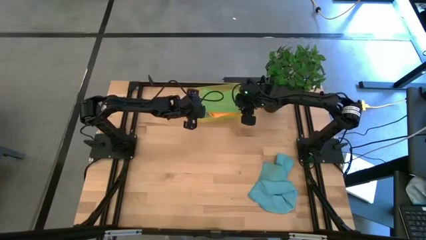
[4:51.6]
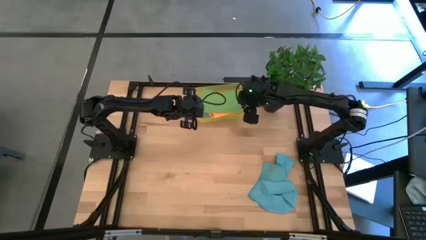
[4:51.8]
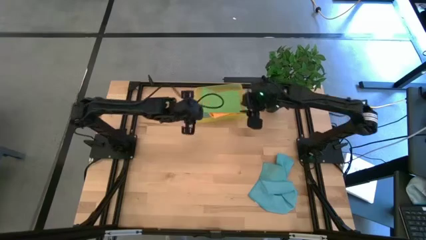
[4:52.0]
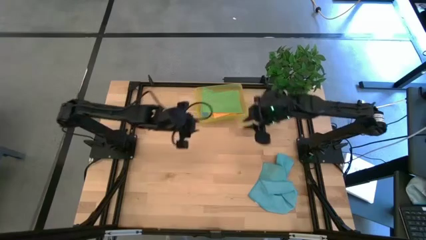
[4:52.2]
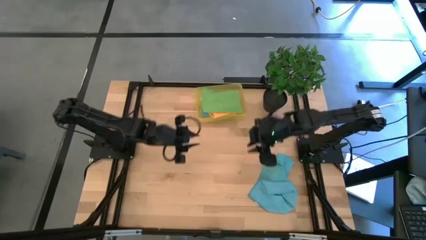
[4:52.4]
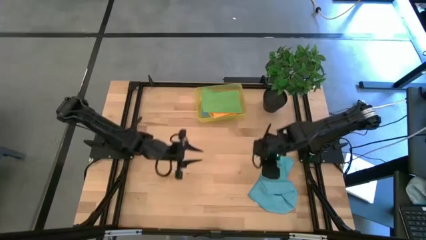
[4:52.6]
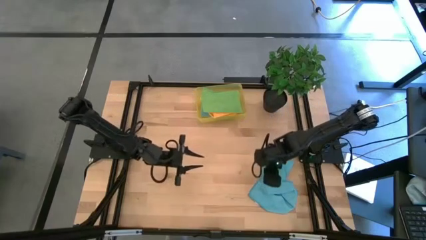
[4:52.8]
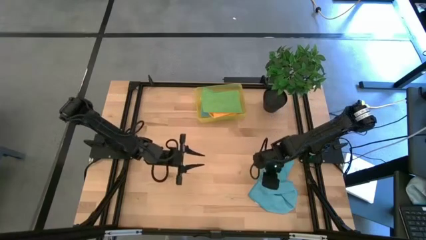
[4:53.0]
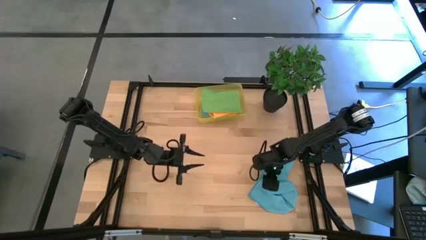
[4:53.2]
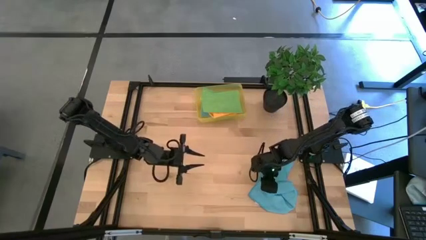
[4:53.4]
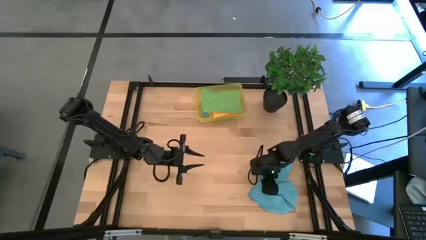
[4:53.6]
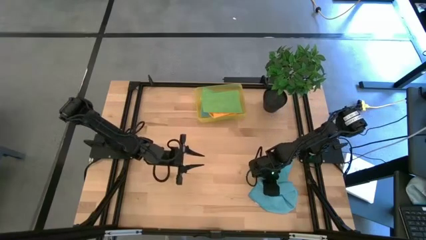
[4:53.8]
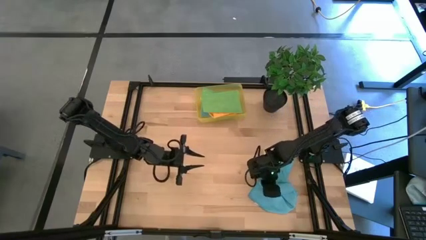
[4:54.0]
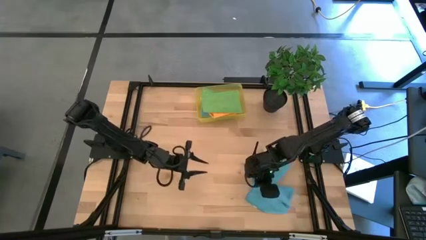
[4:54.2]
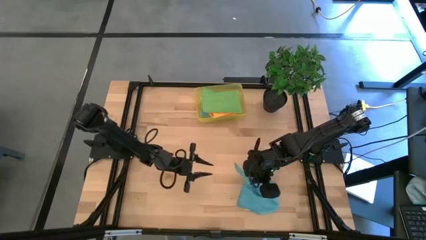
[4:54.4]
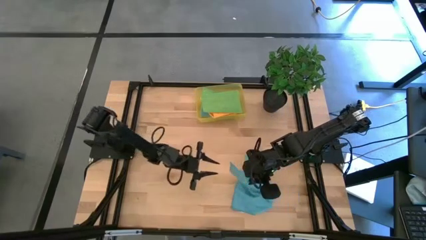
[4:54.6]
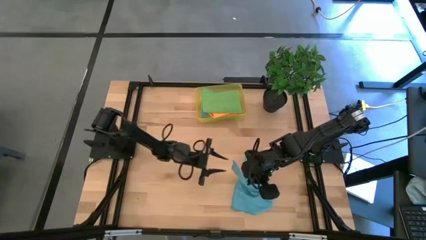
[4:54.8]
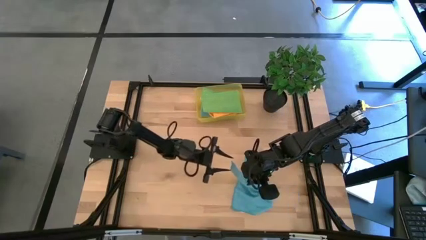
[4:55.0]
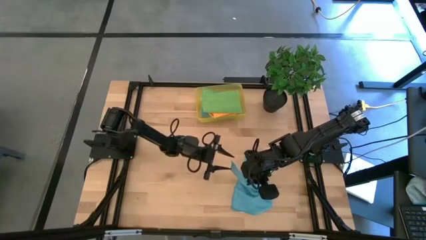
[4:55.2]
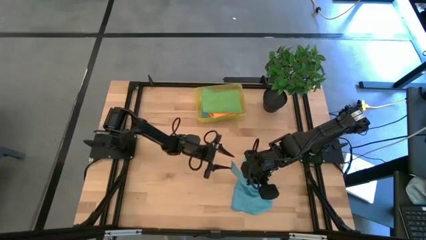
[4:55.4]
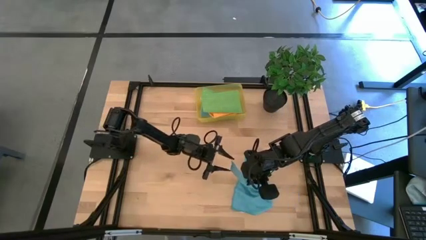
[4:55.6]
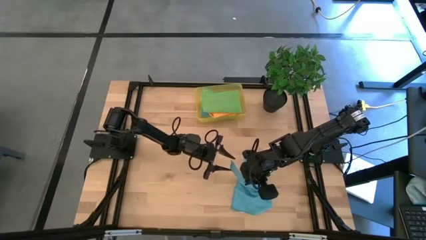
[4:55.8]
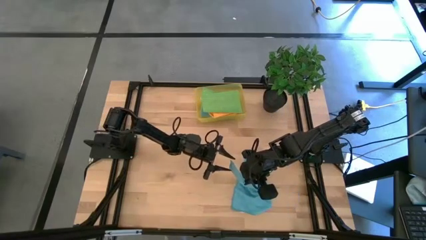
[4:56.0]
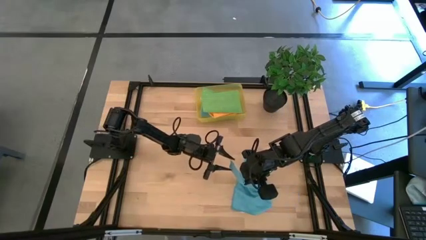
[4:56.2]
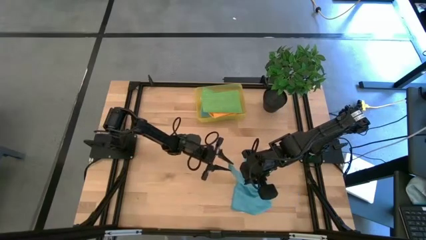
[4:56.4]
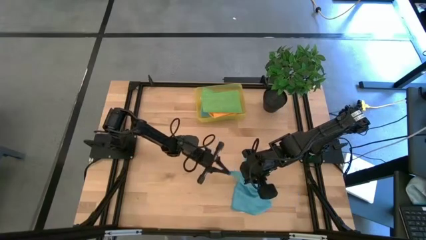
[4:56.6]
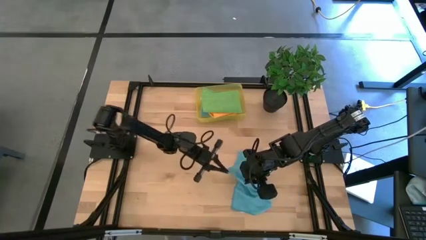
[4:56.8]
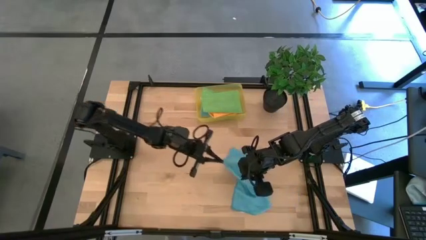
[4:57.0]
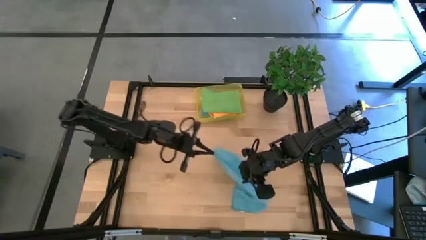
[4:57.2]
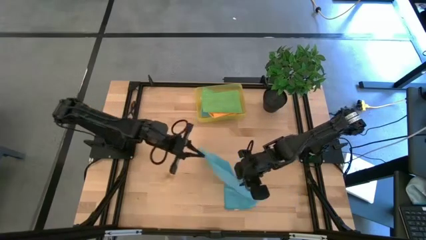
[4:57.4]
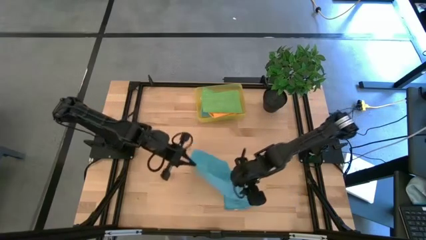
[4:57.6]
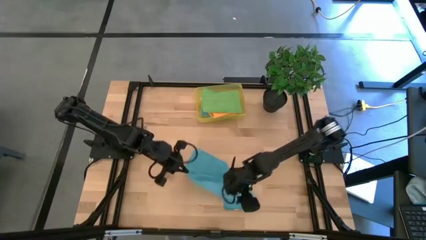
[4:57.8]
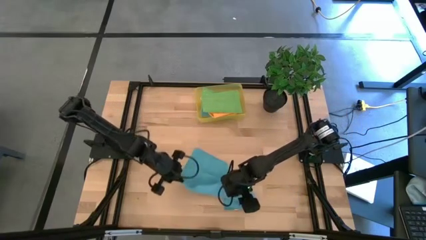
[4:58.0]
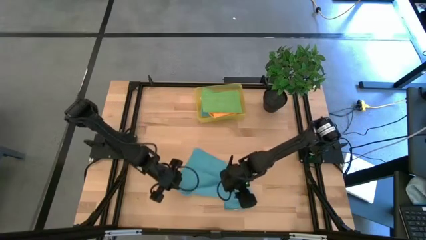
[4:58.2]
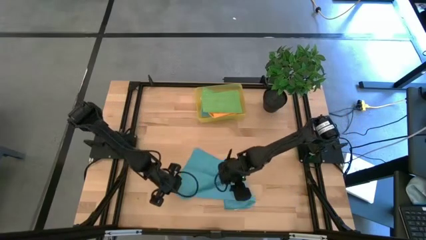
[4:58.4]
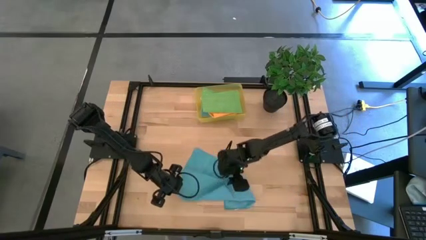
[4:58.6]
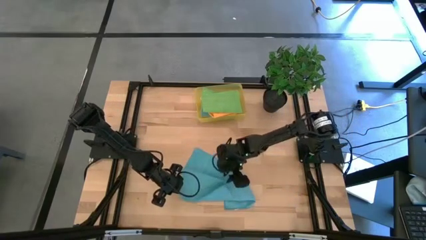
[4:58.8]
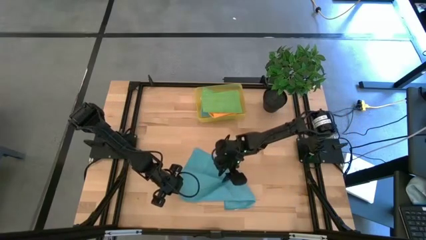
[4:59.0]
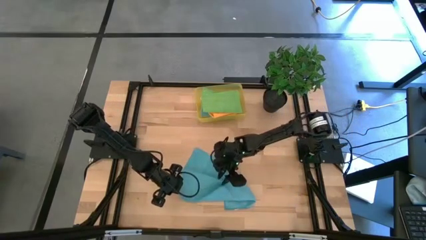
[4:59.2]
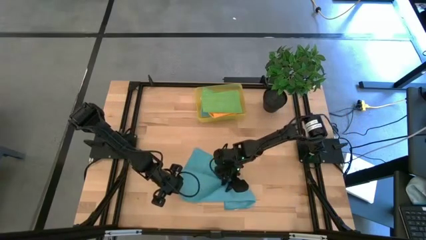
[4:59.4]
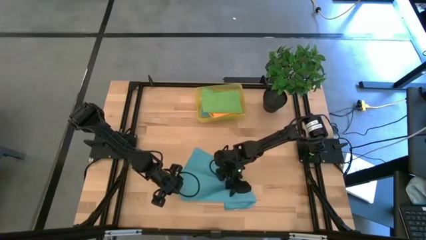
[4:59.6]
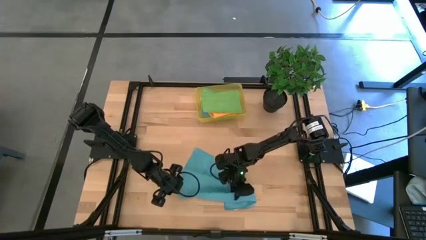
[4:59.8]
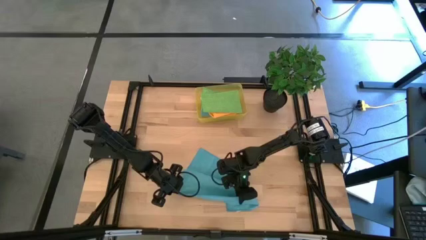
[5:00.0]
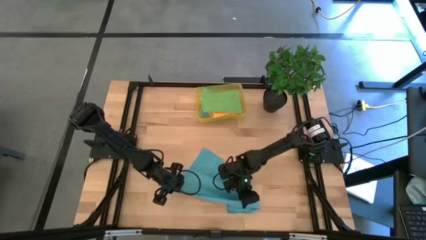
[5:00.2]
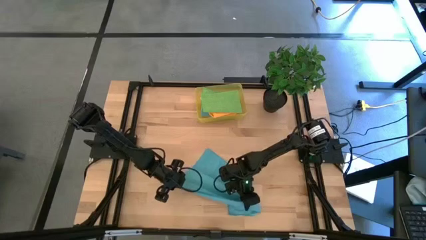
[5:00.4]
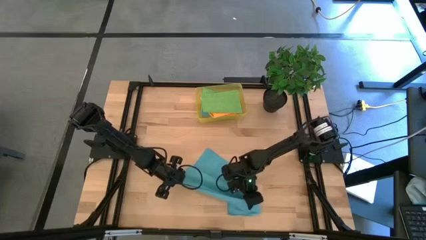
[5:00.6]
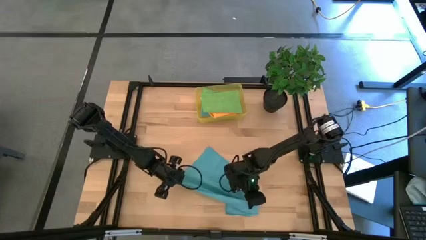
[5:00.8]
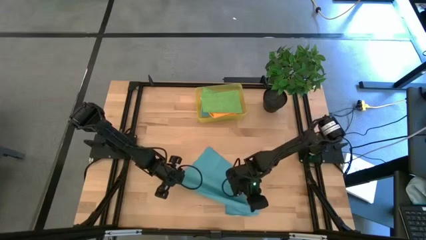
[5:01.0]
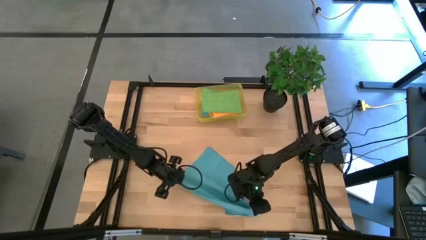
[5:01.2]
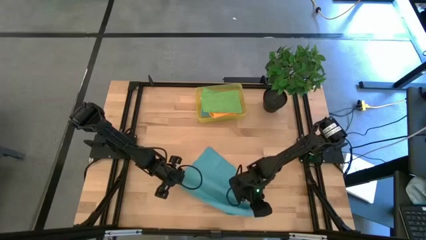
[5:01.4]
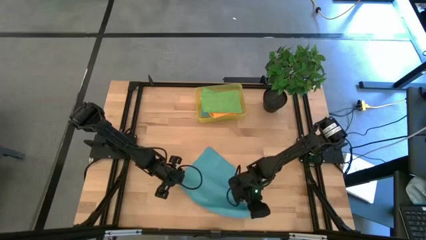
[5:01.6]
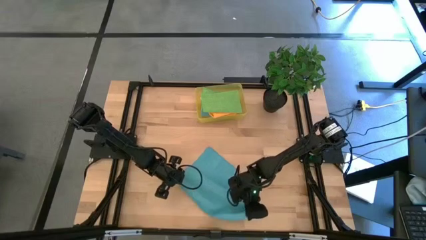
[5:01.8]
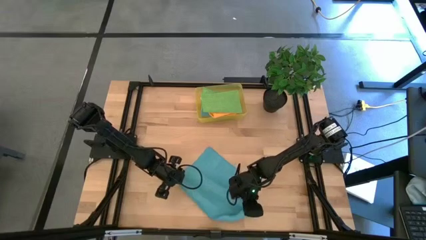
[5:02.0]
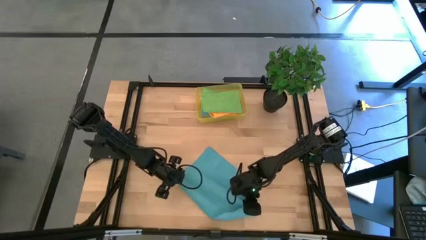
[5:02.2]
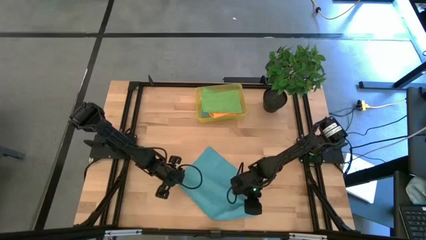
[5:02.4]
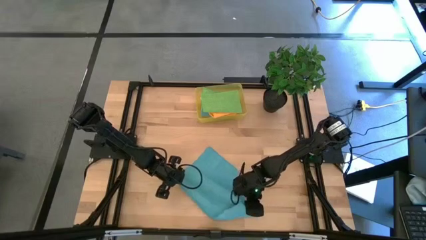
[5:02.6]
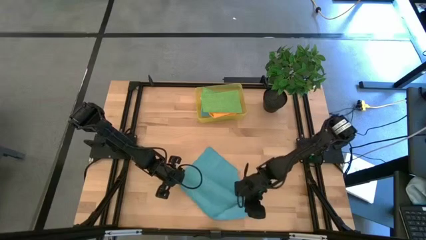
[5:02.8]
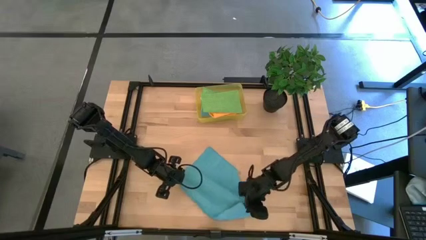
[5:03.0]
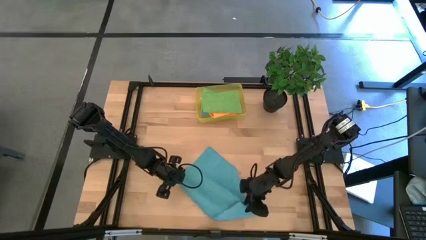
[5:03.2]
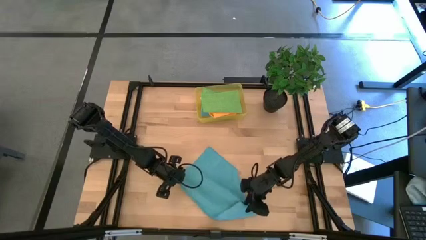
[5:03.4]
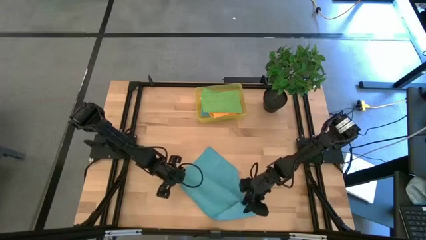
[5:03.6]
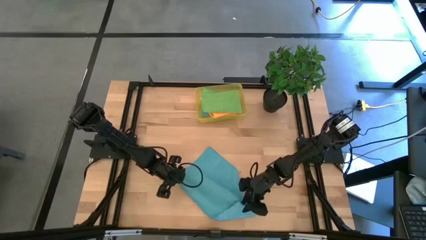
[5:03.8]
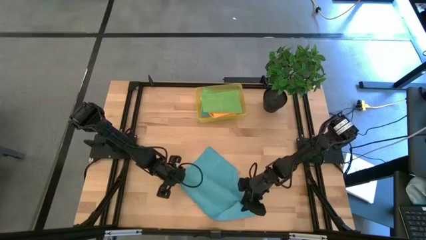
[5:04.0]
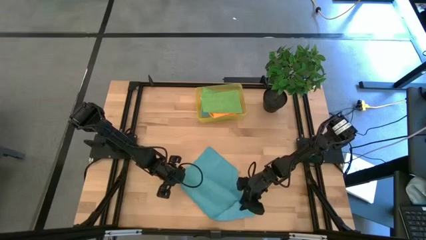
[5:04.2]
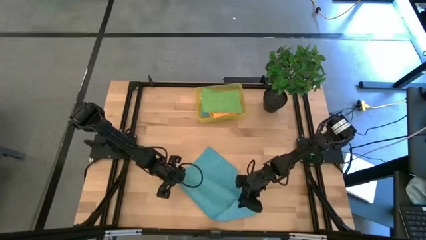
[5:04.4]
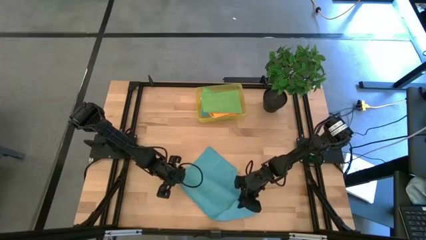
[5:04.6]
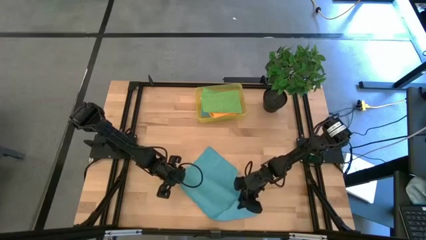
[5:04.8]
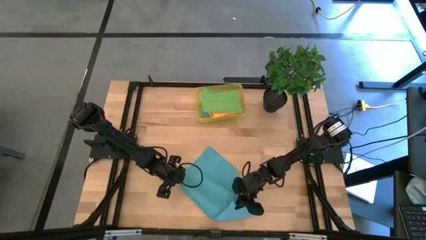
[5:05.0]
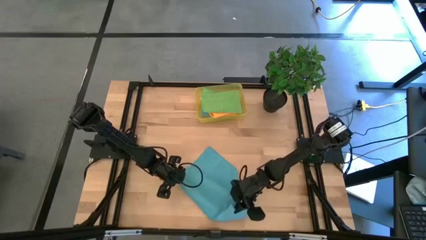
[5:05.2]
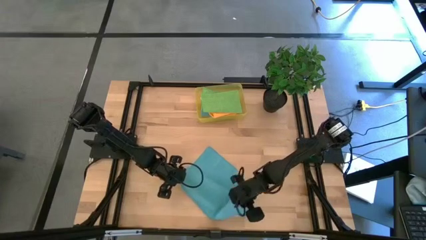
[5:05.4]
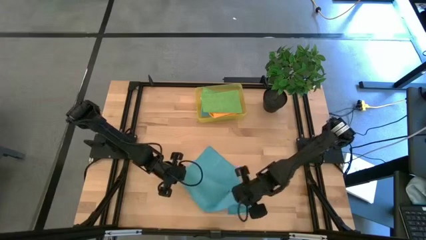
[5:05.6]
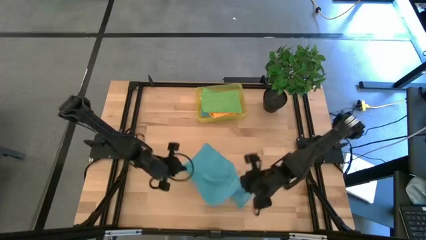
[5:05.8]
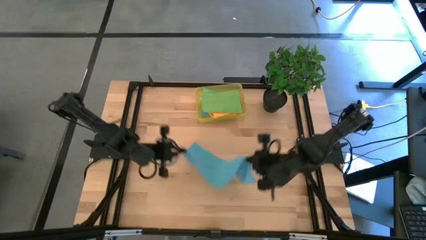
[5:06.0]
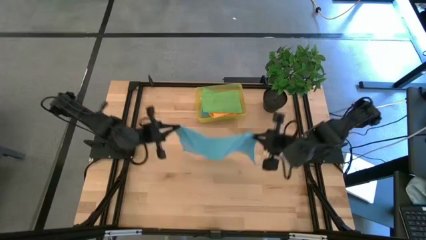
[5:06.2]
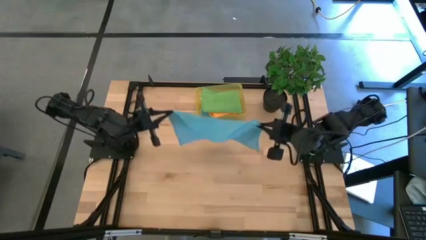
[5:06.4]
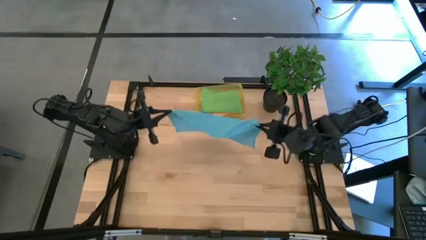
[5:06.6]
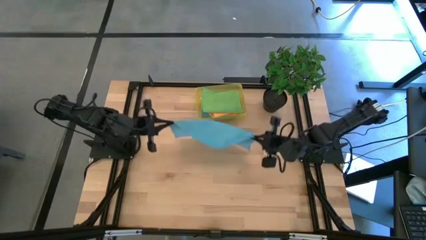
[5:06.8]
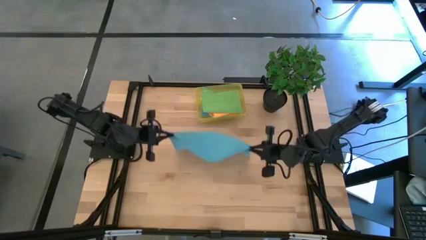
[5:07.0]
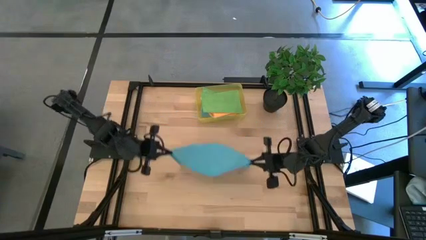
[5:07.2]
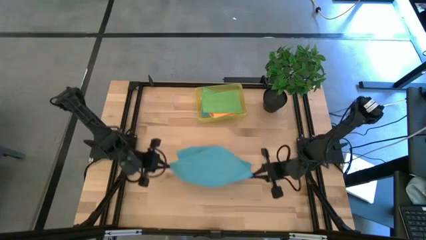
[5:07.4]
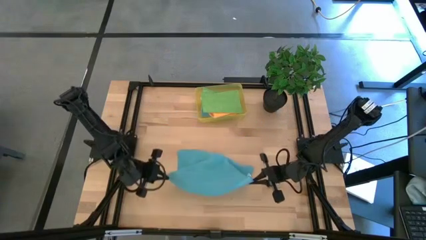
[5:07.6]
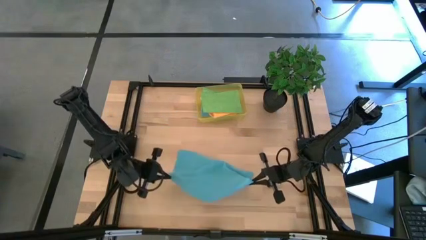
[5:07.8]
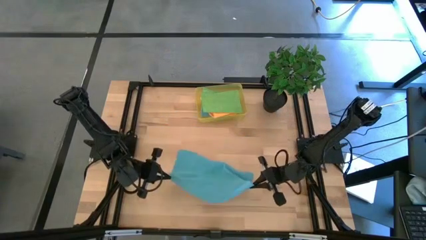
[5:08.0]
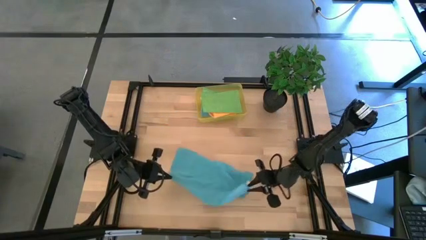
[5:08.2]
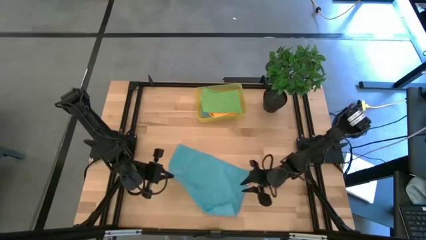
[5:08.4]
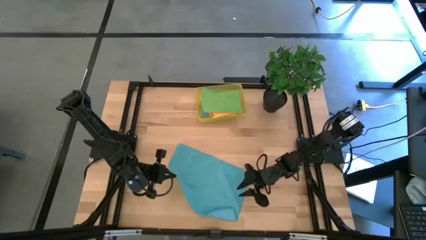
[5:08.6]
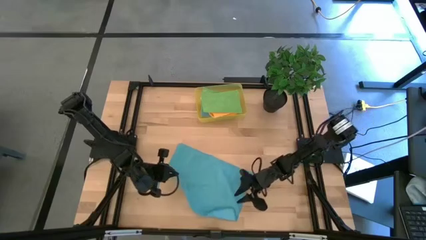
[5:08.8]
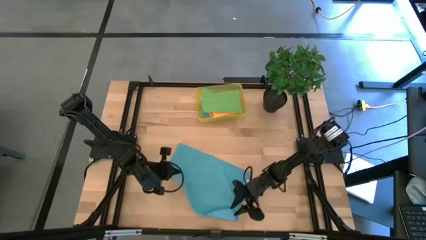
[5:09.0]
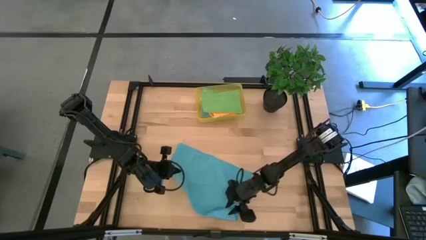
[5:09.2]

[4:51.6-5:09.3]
Task: Fold microfiber towels
Fold the blue microfiber towel
